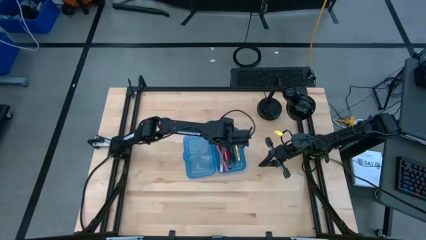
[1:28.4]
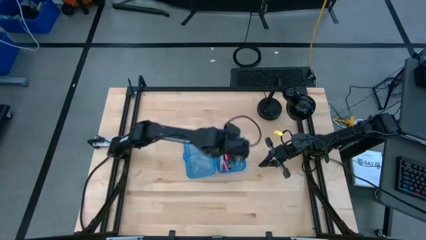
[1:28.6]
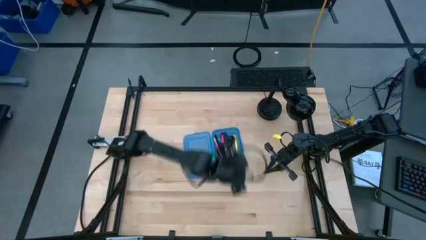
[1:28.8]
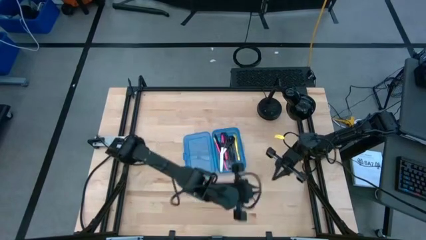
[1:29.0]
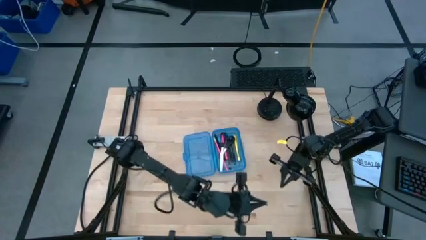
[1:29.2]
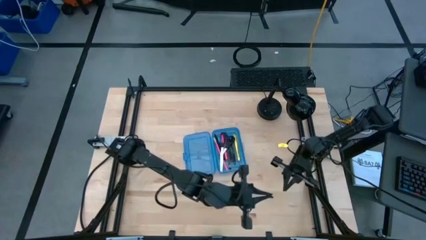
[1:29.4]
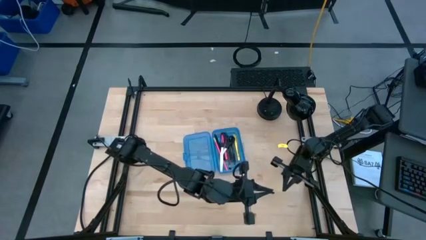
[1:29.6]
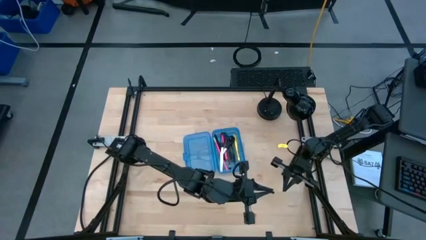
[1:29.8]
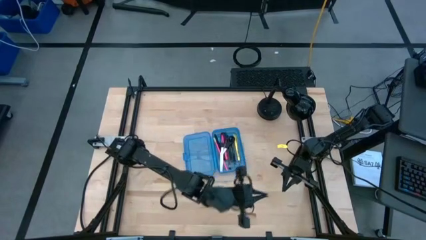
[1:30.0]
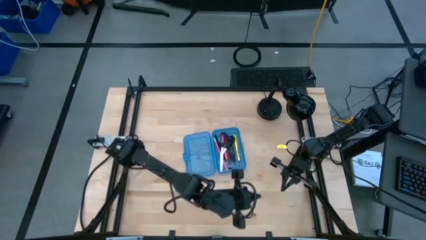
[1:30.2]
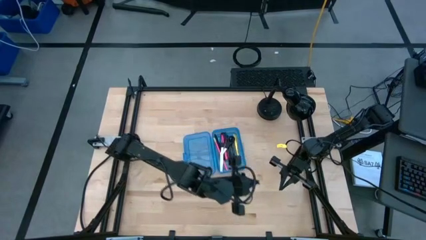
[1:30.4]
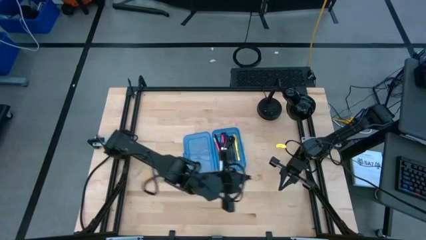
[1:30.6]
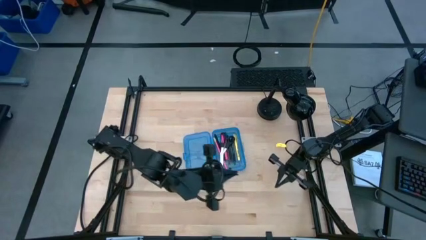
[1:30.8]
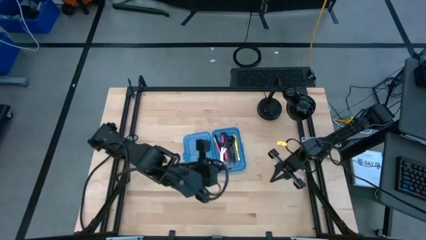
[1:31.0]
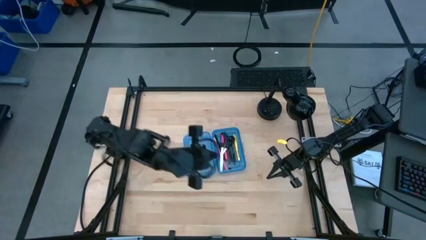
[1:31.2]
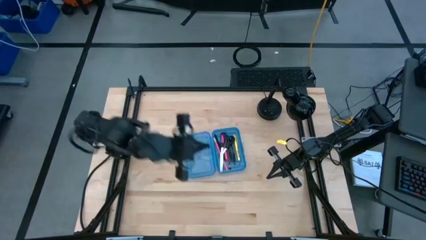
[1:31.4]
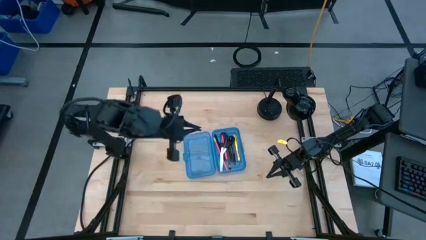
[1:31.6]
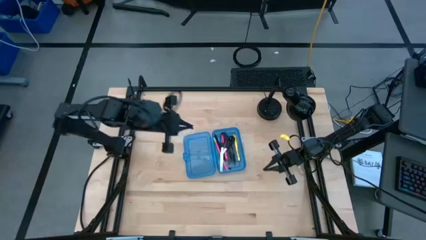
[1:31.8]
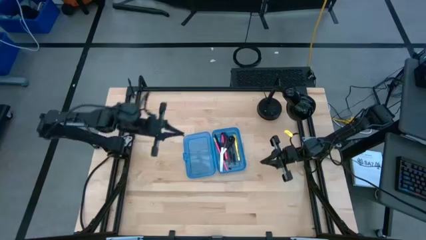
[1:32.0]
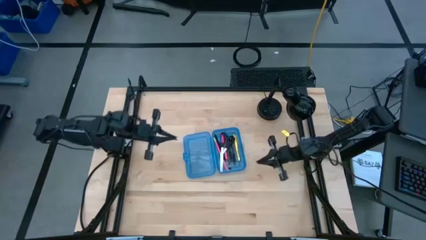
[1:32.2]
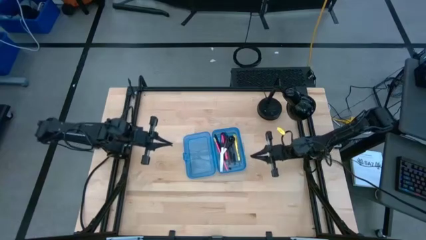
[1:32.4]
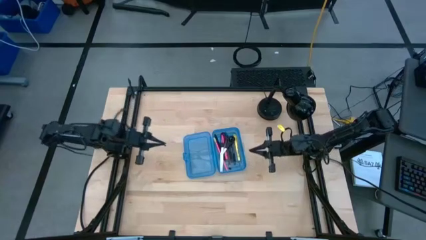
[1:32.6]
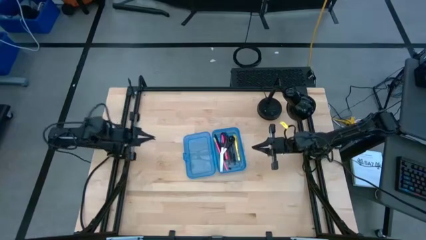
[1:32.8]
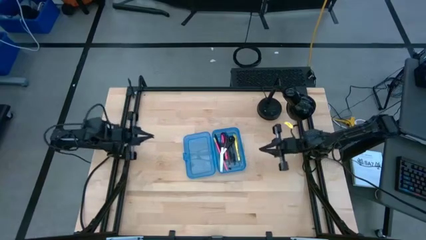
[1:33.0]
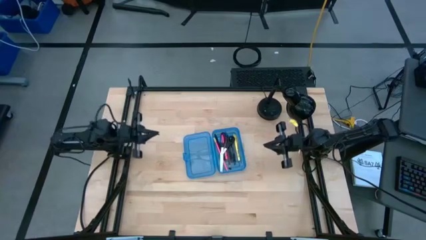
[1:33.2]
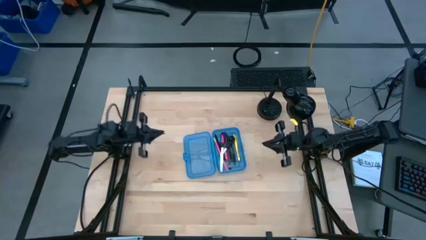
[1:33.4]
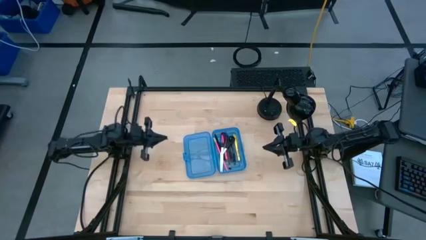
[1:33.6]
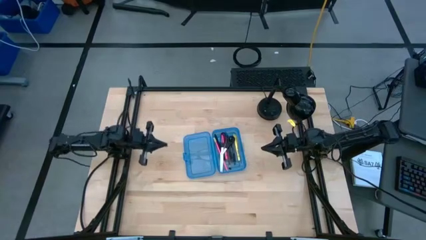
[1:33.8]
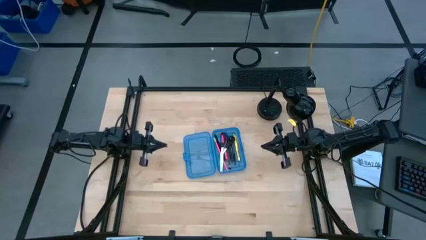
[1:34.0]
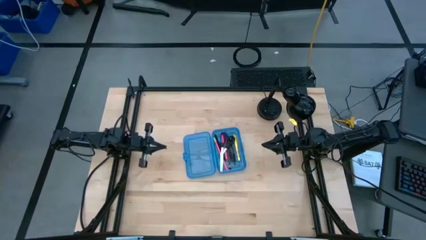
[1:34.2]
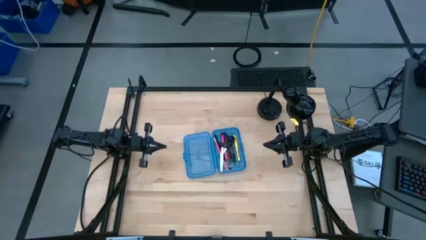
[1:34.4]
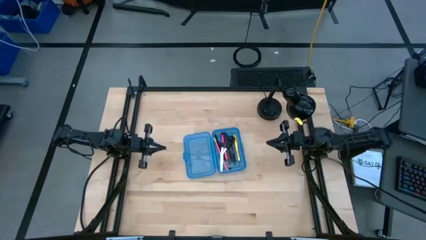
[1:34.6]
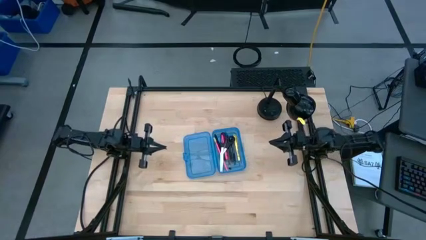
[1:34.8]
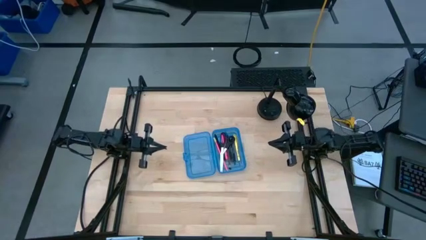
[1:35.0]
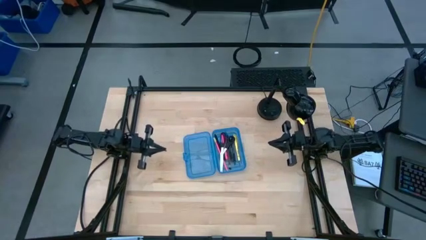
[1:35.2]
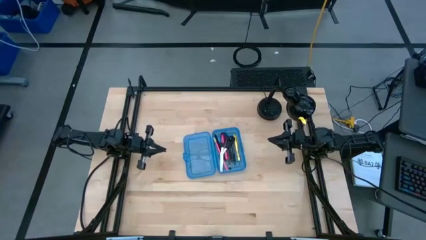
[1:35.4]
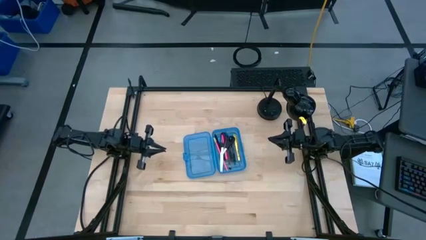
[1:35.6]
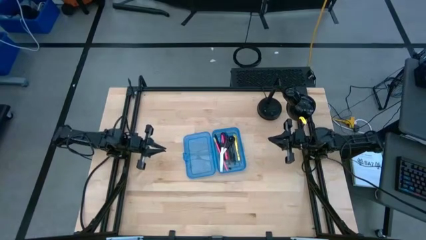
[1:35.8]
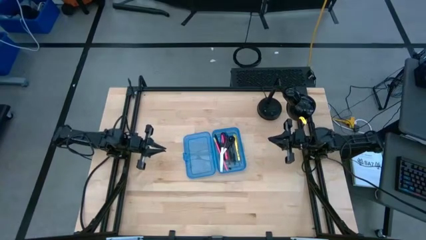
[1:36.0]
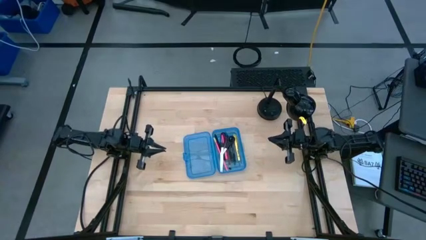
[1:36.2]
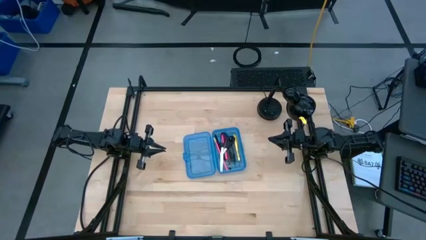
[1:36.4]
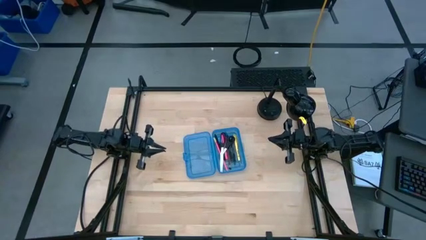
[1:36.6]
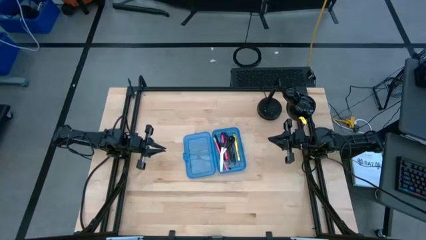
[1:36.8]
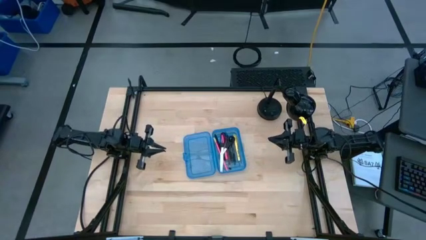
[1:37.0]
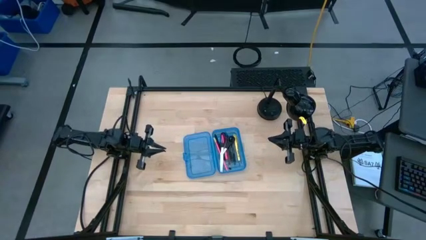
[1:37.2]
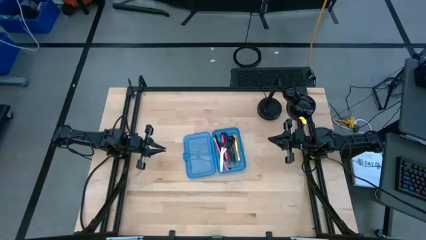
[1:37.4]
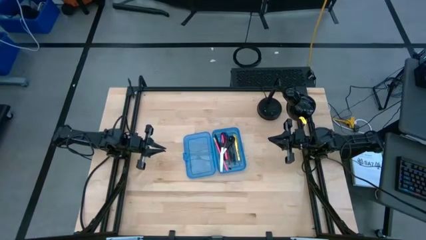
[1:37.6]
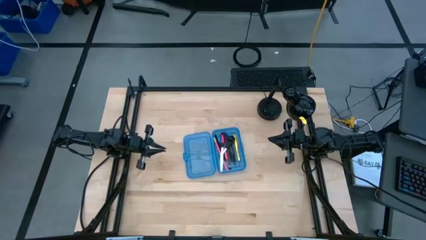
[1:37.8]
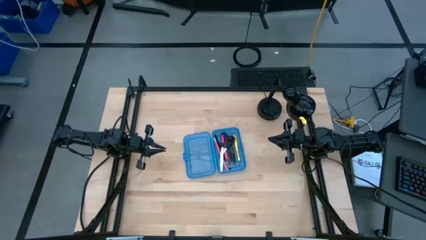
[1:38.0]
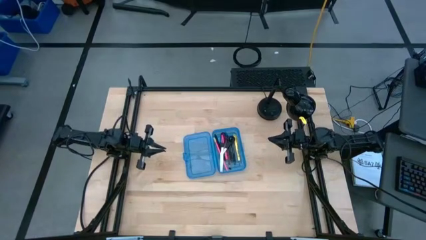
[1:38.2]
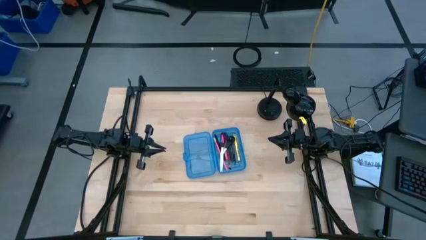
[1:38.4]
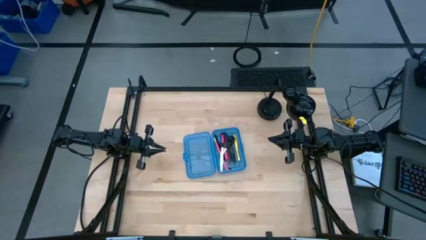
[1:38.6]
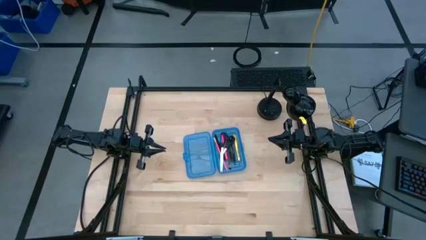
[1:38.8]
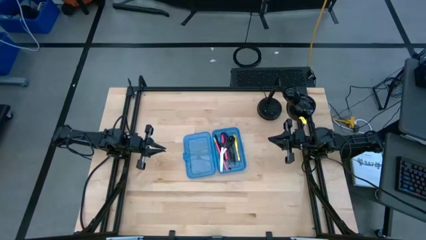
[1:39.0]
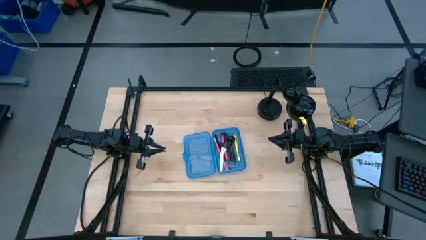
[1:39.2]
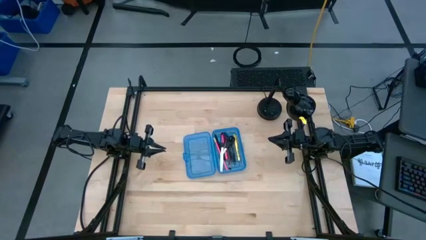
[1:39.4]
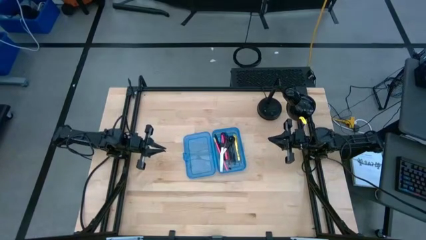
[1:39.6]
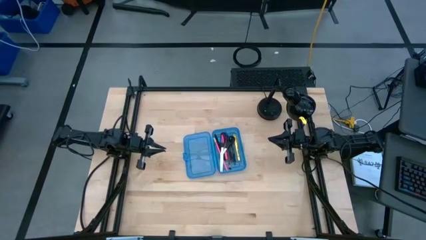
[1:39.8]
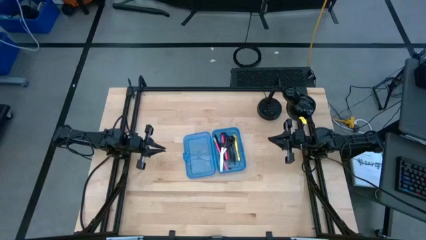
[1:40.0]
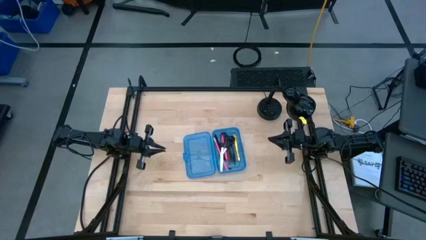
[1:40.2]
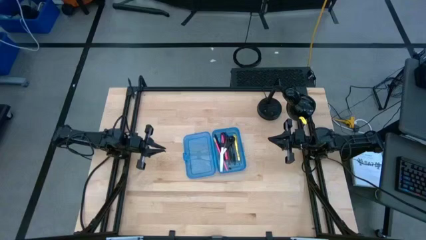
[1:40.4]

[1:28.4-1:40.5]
Task: Pick & place school supplies into a supply box
Return to Home Position
